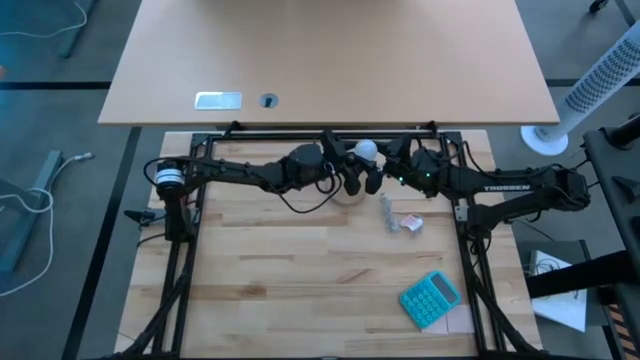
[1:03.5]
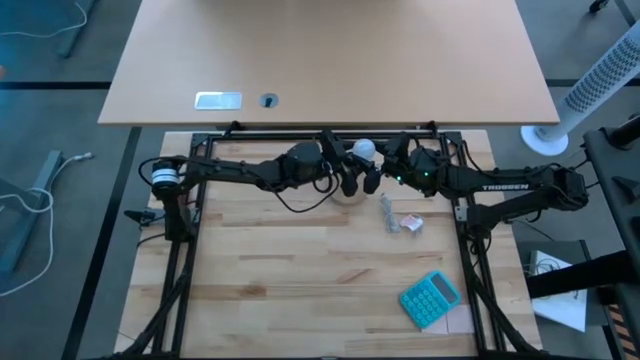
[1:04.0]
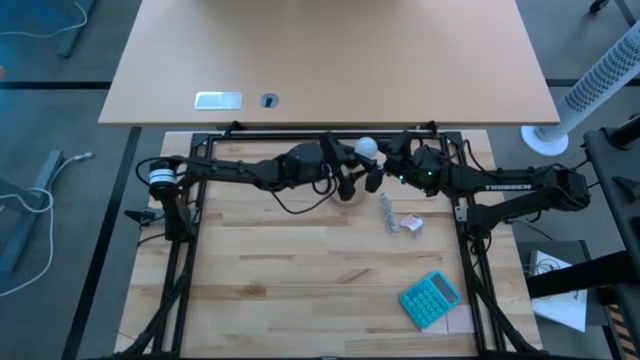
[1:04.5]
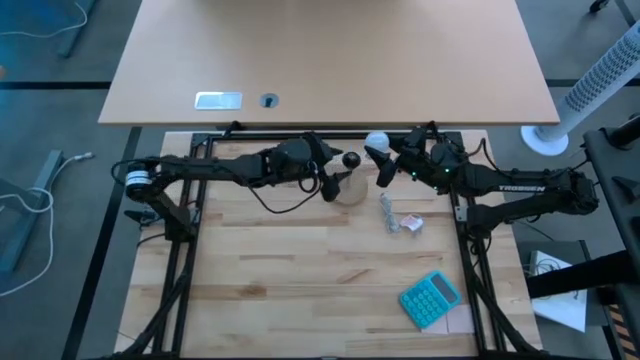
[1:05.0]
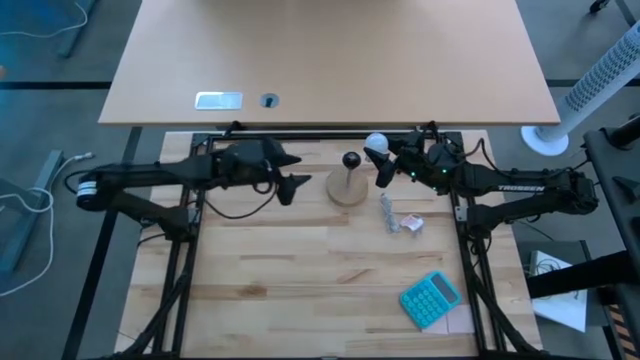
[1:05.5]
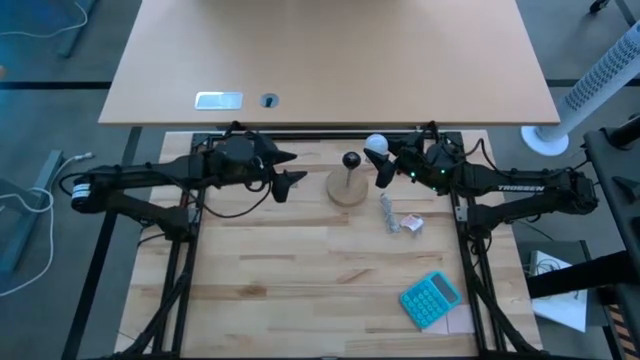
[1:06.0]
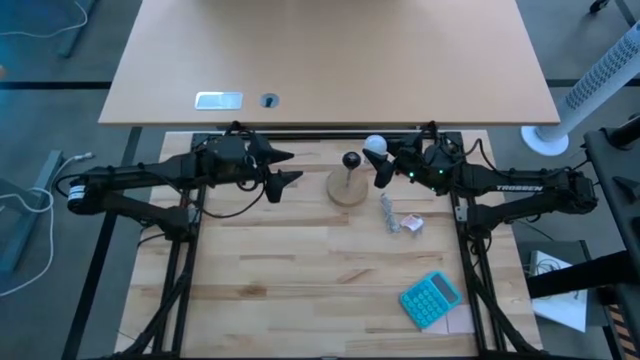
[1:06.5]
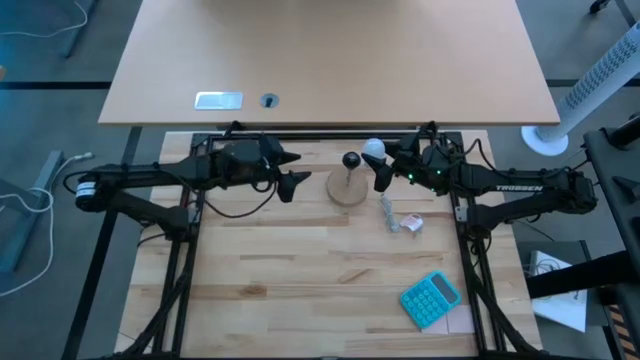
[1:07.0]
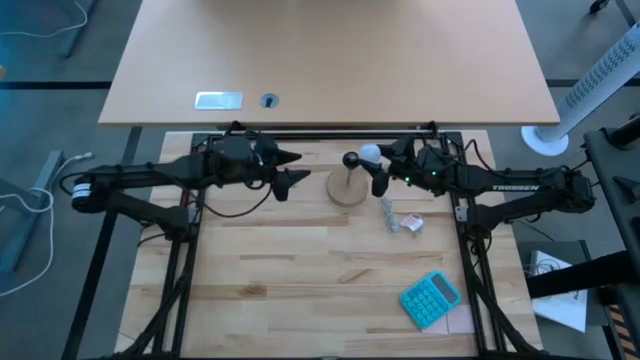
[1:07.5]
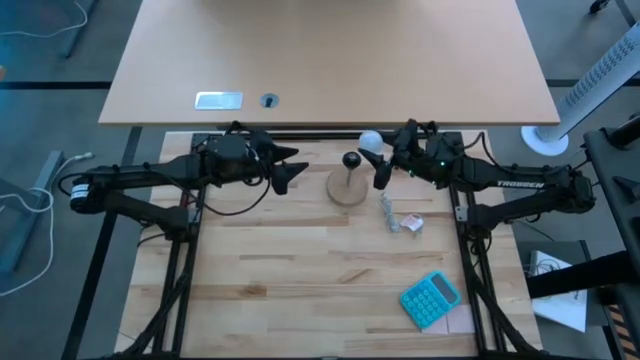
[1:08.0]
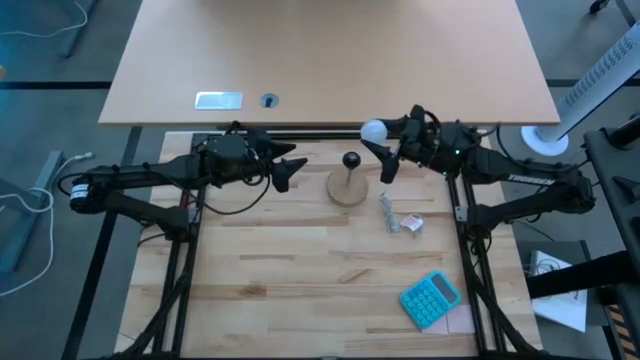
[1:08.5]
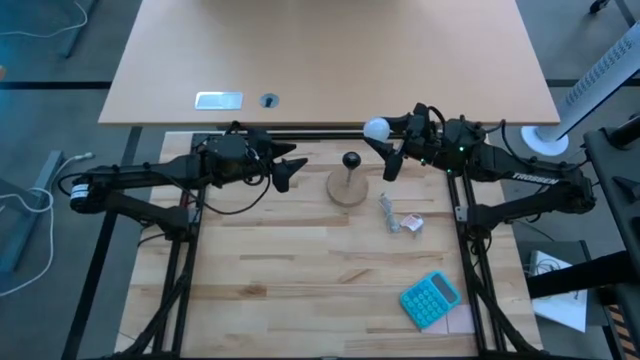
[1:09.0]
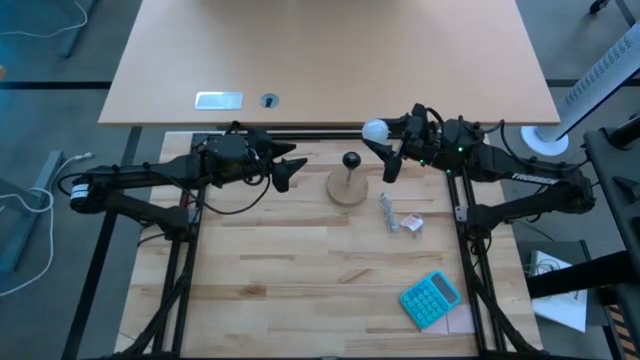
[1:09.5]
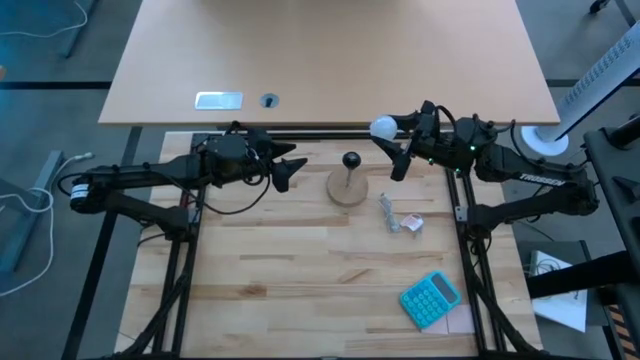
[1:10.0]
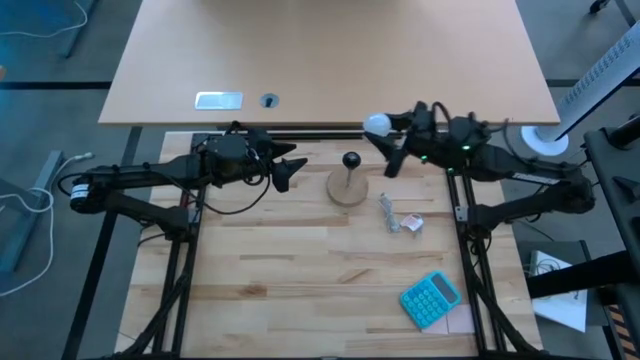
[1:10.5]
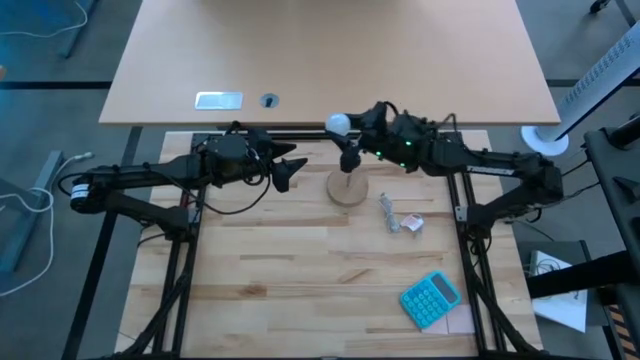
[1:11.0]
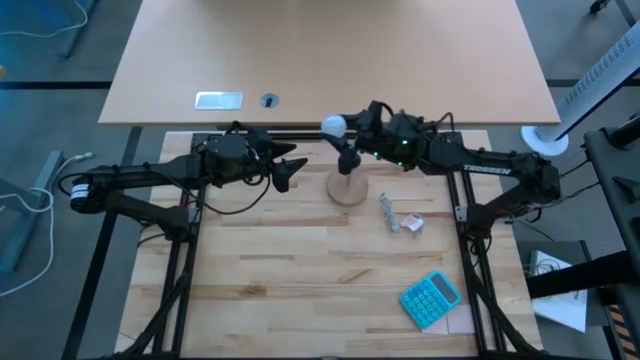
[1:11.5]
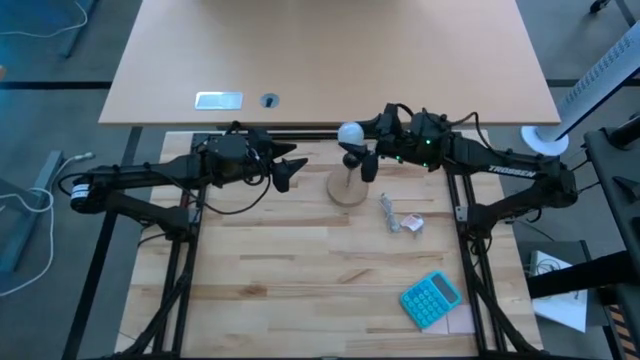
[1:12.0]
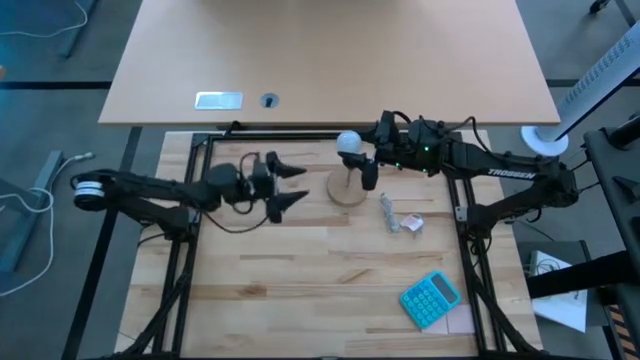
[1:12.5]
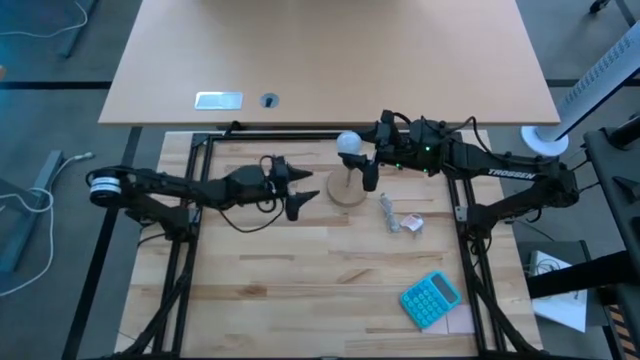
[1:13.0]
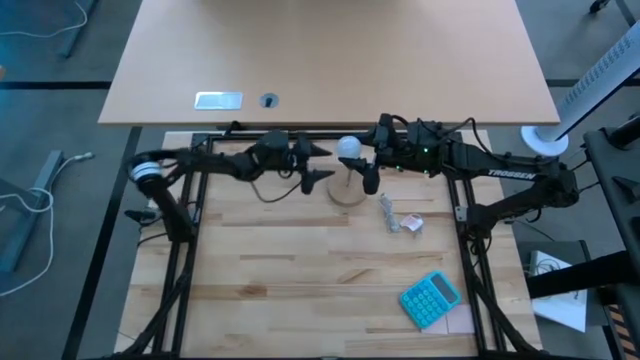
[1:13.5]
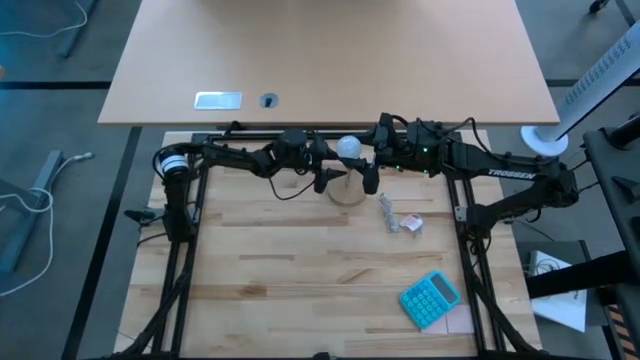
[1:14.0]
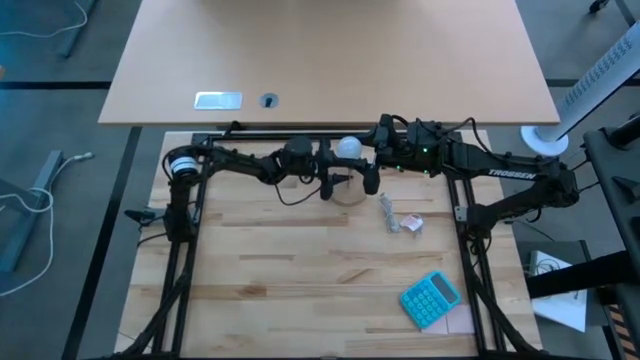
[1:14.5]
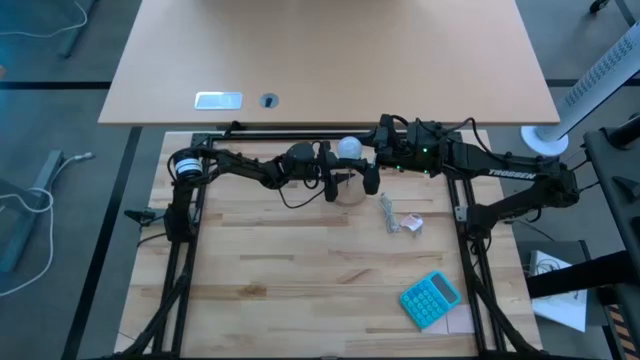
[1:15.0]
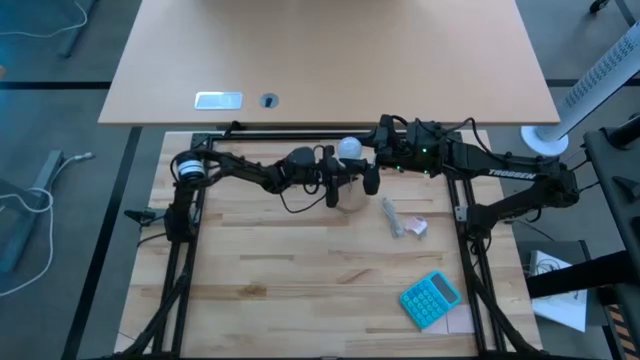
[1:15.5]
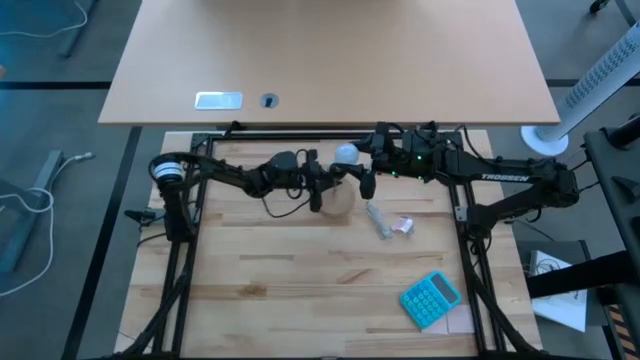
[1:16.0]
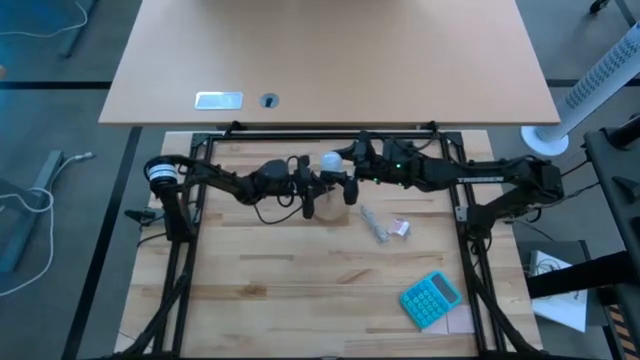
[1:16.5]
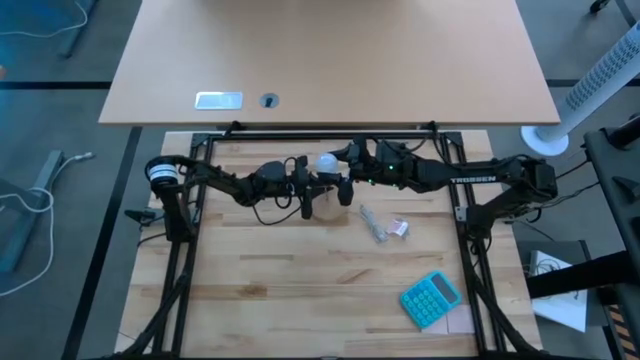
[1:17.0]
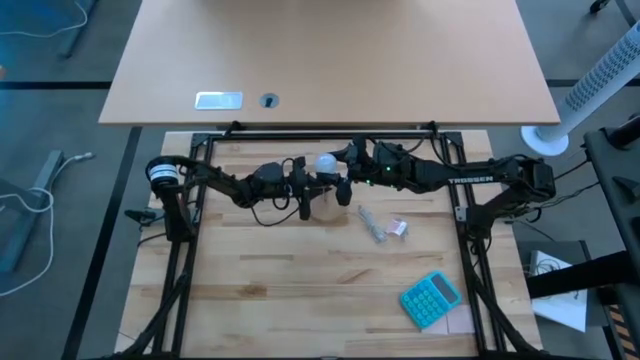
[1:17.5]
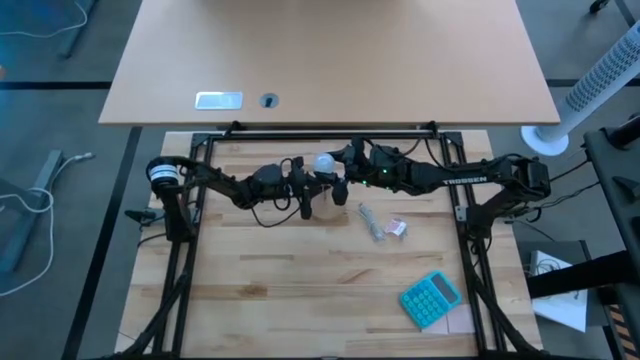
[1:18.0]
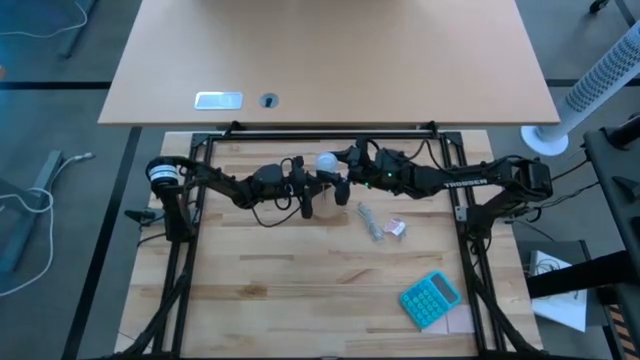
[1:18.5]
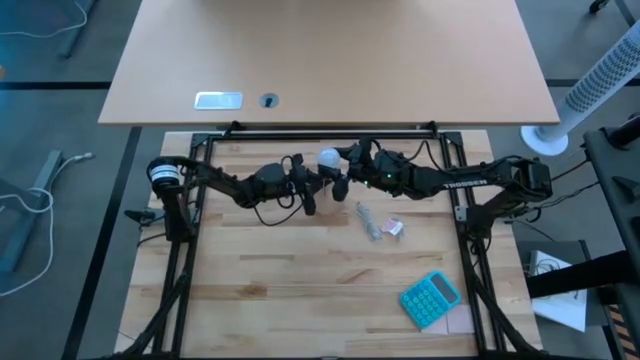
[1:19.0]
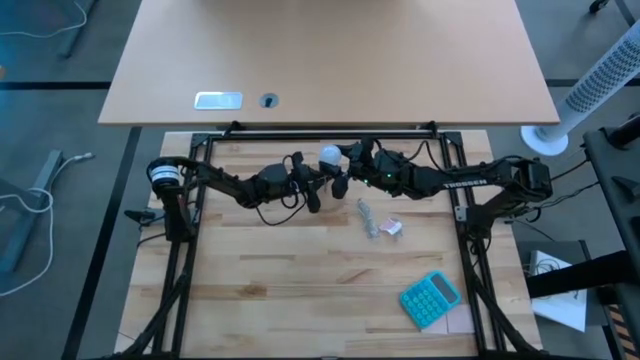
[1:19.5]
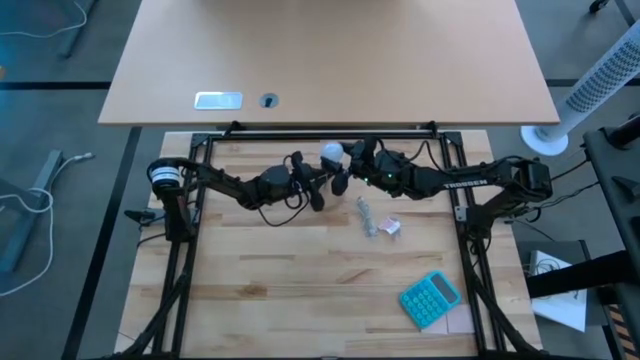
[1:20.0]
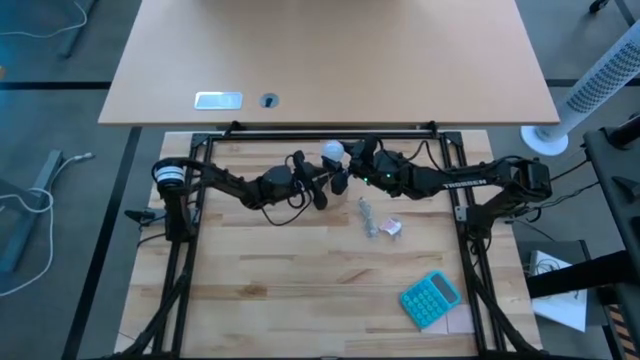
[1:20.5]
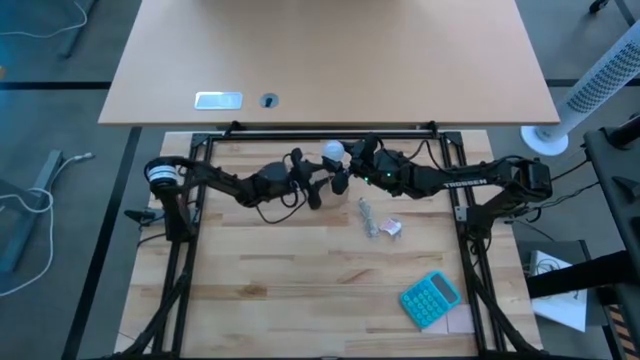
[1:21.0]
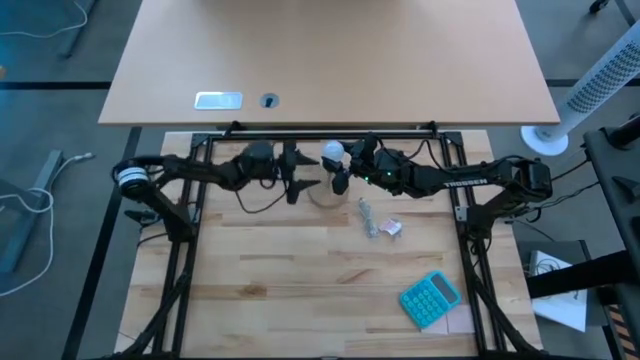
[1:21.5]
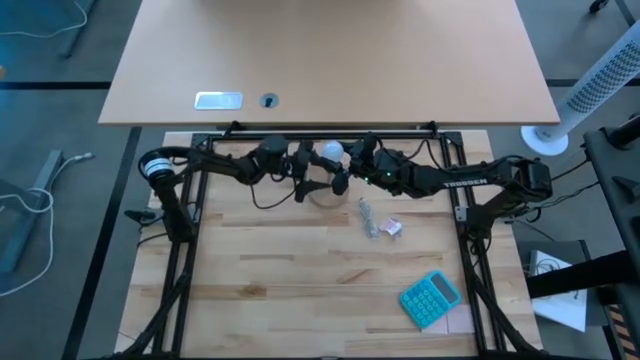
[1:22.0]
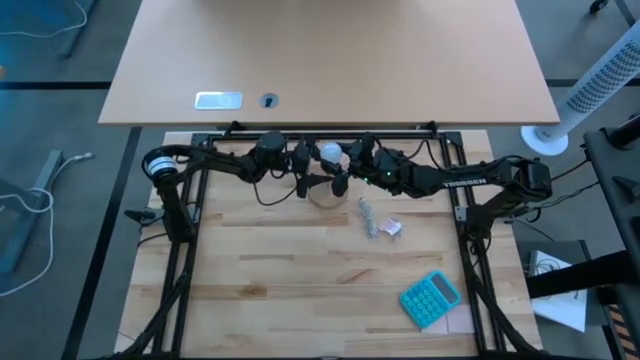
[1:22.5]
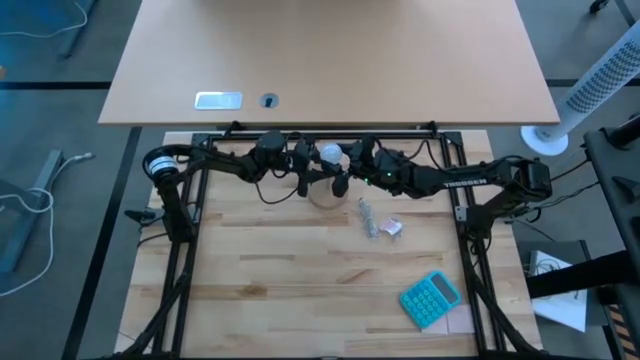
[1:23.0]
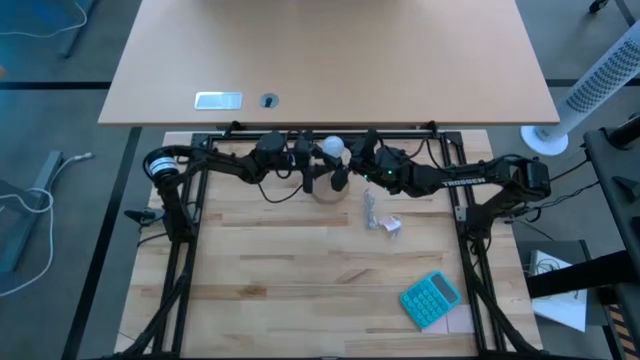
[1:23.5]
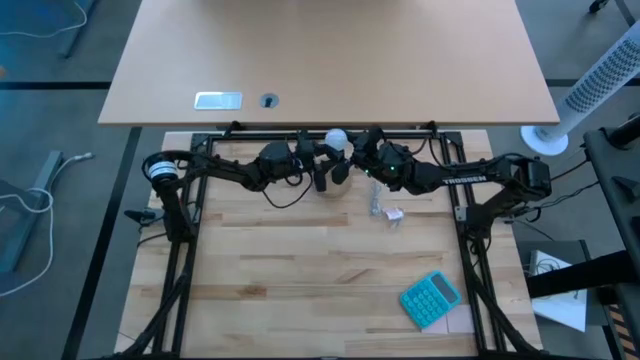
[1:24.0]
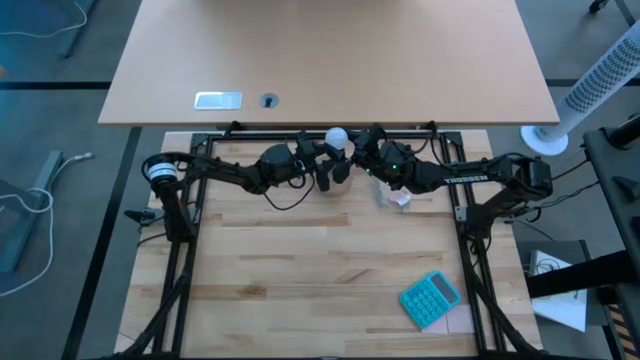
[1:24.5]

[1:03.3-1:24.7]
Task: Screw lightbulb
Insert the lightbulb into the lamp
